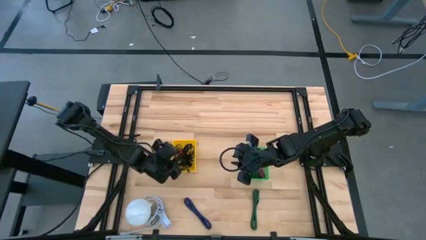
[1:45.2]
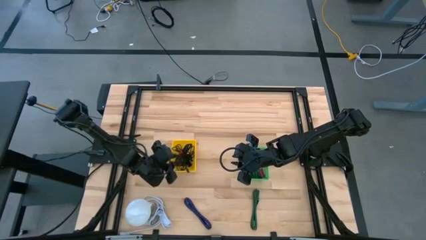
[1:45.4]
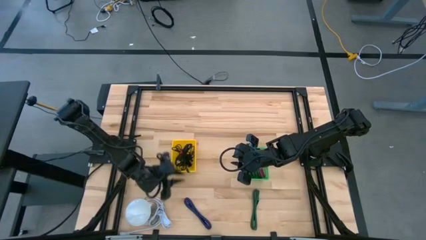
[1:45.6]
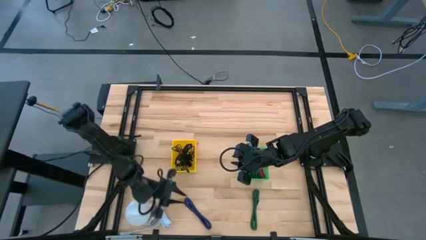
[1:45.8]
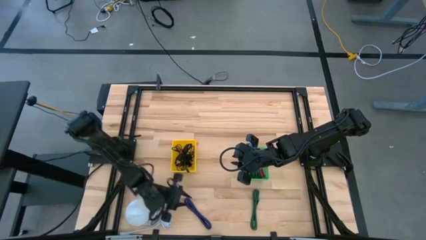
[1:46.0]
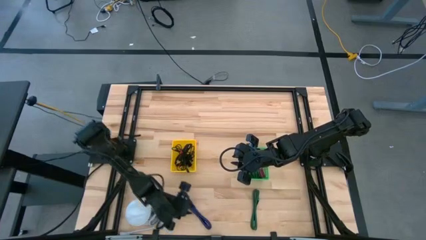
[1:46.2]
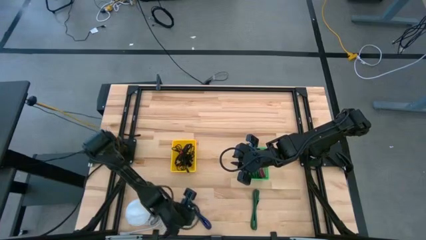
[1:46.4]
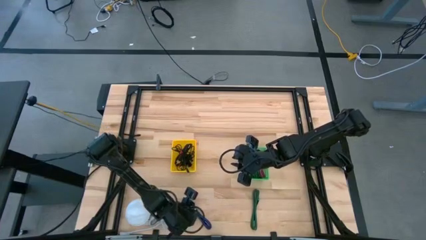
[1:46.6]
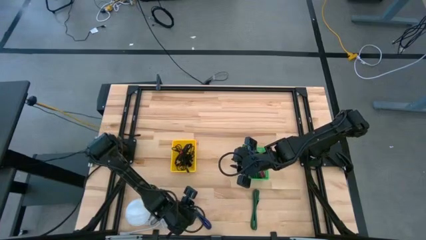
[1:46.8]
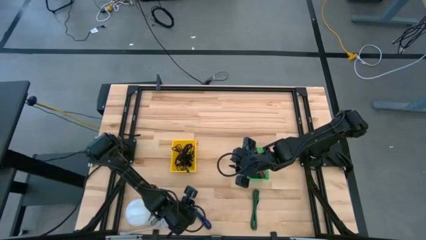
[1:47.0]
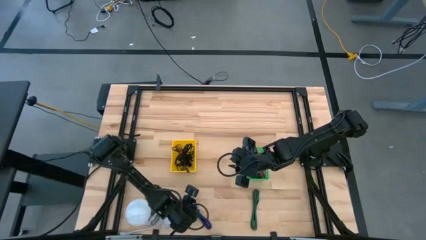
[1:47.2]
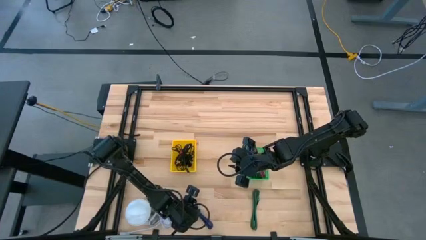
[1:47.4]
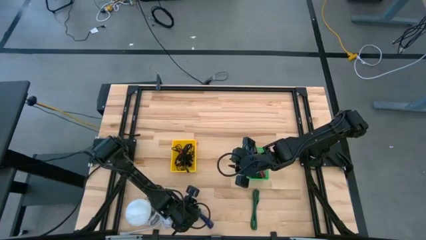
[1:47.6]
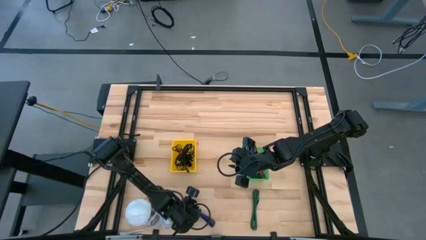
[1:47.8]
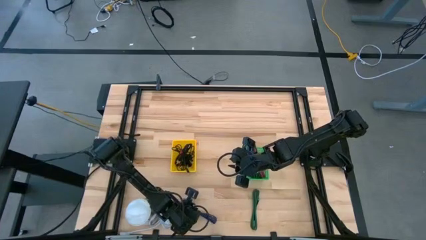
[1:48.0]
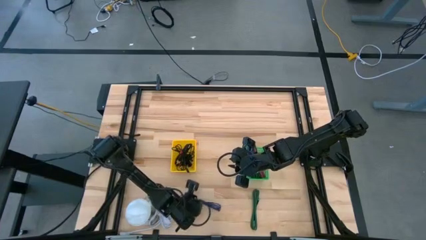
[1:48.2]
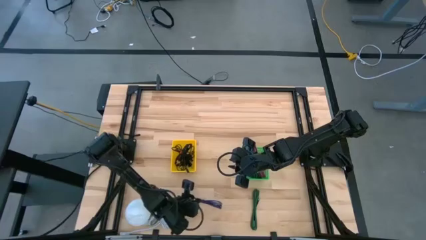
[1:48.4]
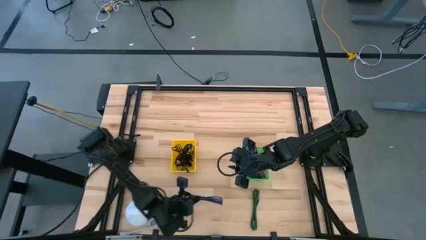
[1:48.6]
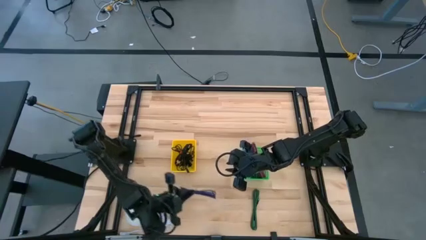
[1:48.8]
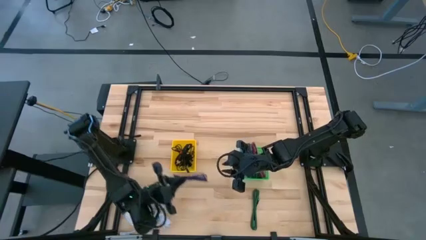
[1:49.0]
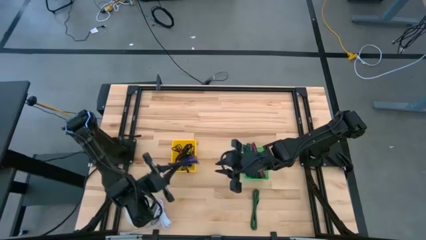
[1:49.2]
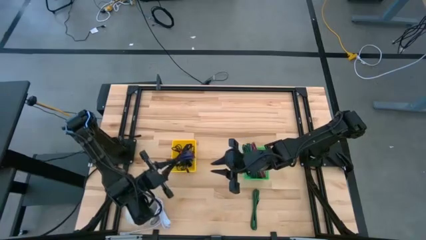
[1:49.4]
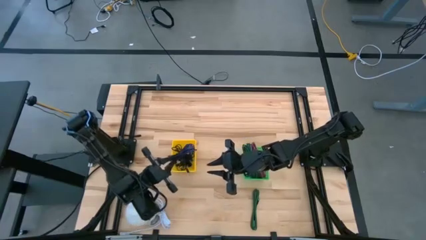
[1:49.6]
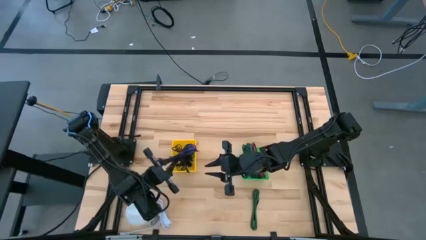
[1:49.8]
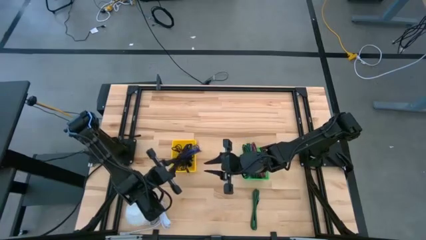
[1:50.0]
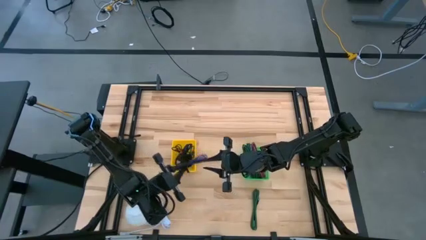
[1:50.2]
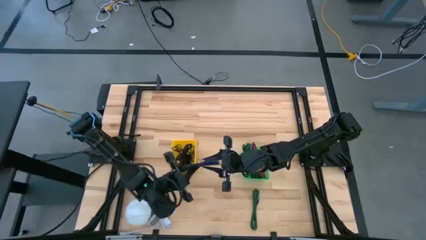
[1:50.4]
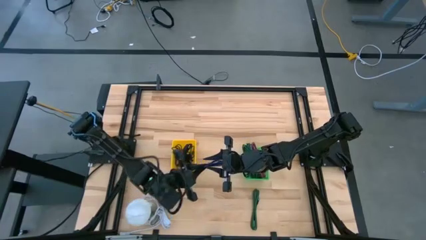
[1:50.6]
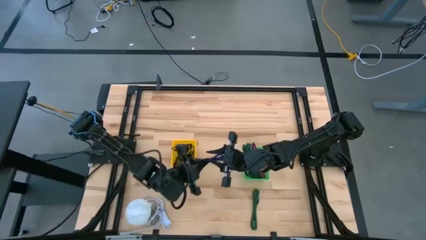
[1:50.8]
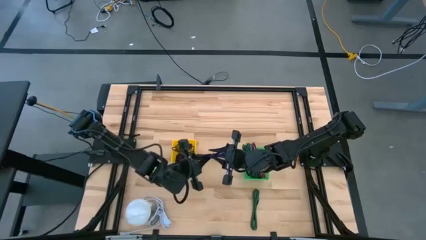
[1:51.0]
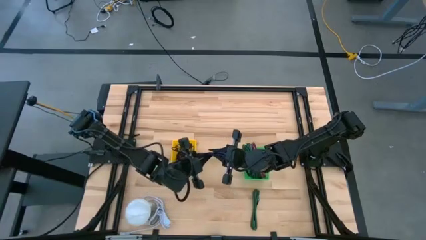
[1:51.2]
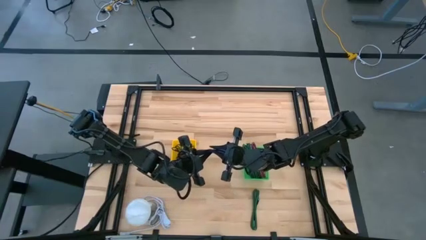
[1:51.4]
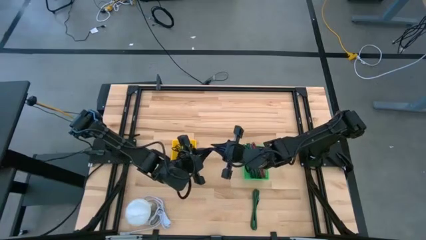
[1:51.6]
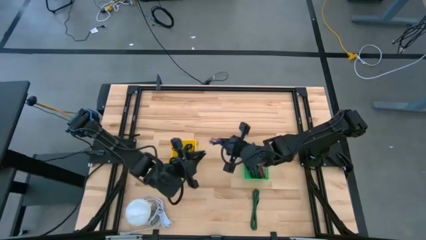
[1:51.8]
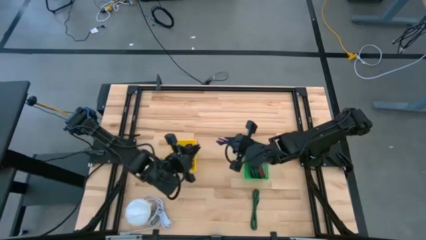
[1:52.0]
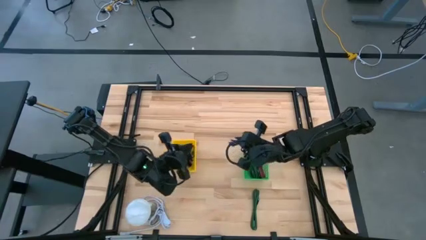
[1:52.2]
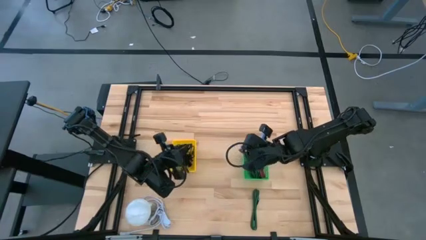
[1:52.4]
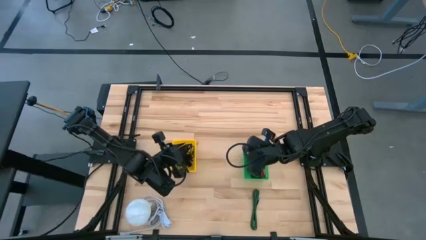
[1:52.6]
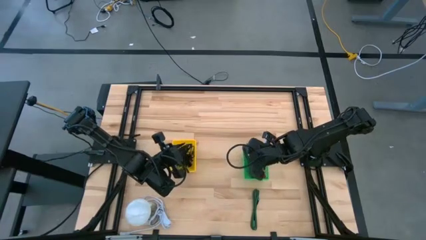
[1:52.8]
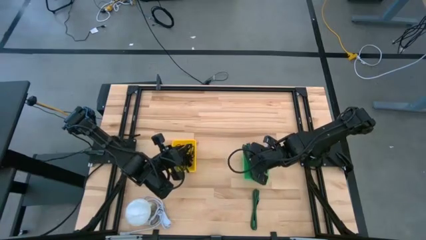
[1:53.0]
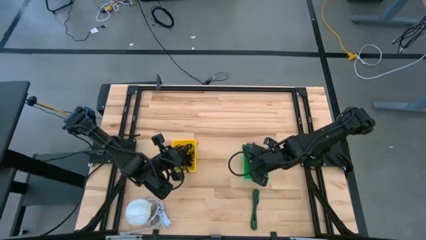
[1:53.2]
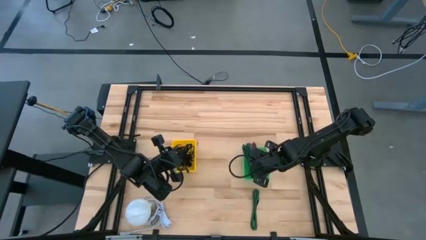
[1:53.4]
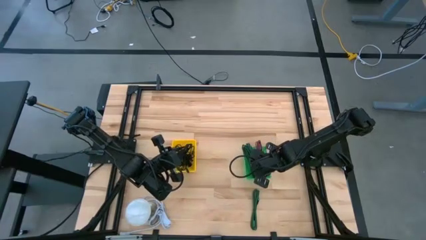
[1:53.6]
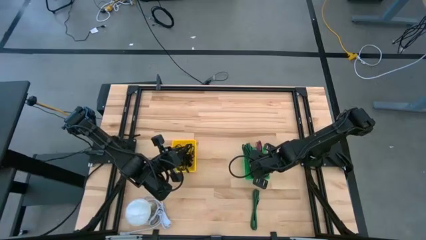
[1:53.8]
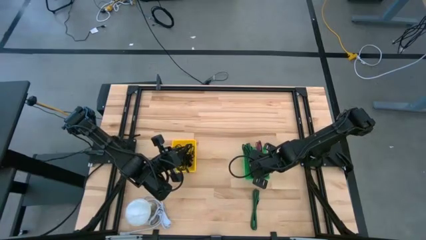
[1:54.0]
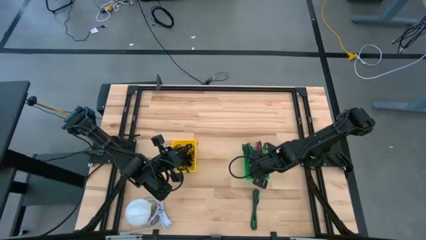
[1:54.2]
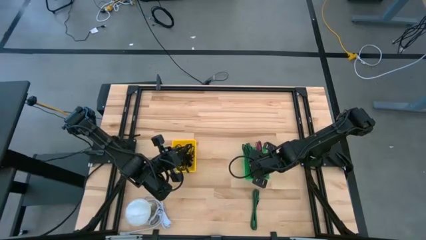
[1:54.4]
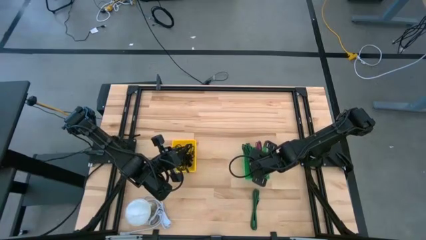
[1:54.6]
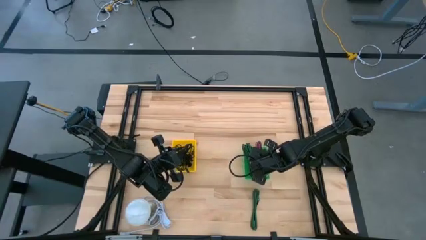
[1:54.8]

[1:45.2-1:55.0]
Task: Pick & Place USB Port
Put the black blue charger cable into the green bin

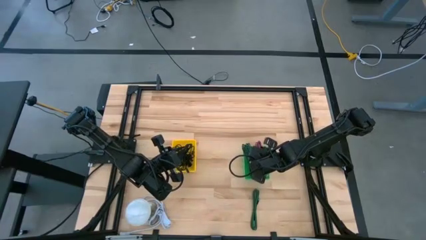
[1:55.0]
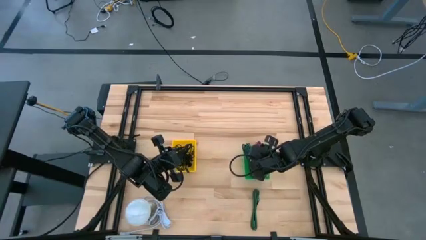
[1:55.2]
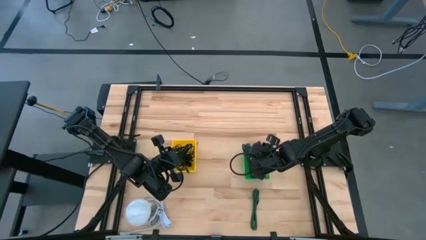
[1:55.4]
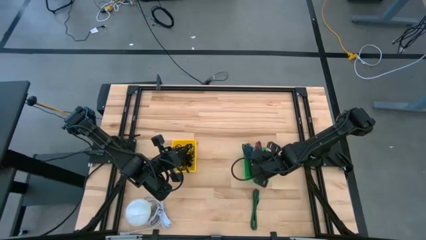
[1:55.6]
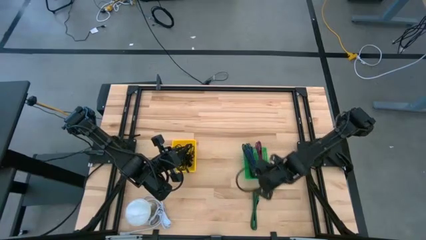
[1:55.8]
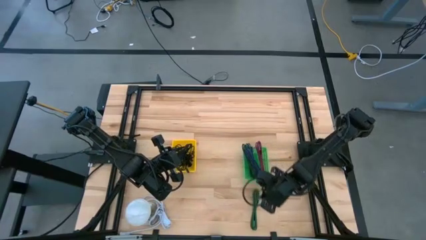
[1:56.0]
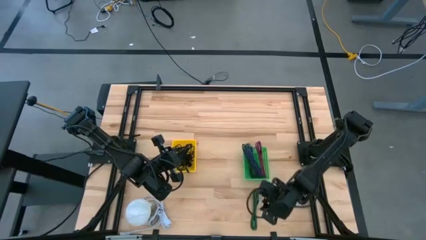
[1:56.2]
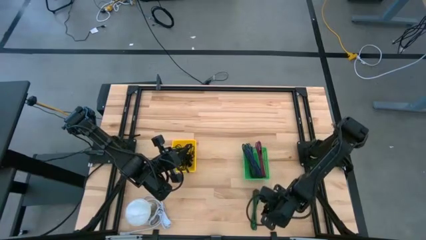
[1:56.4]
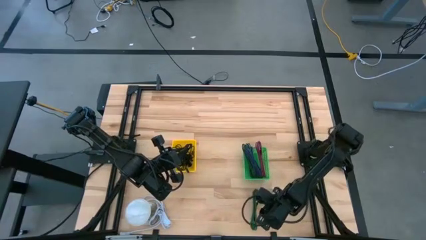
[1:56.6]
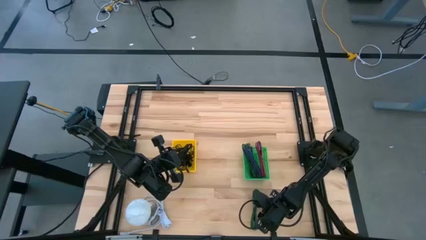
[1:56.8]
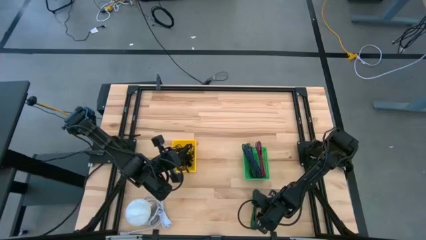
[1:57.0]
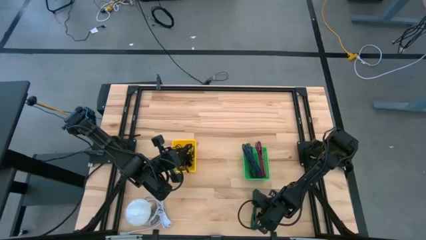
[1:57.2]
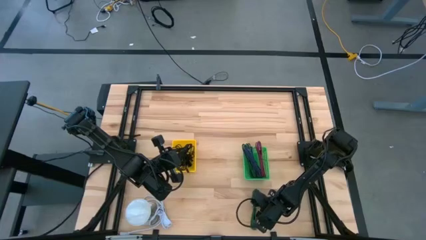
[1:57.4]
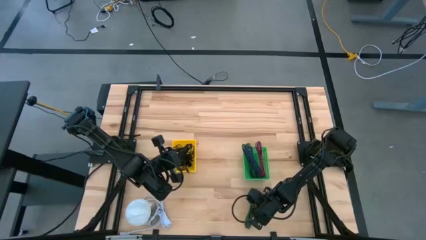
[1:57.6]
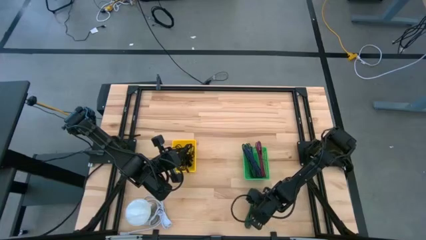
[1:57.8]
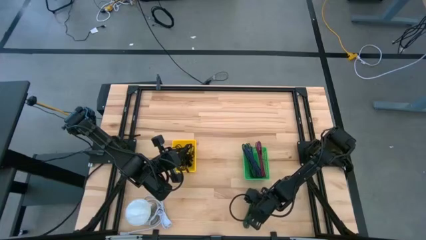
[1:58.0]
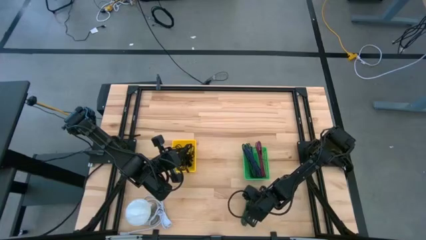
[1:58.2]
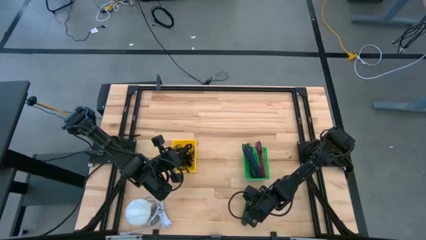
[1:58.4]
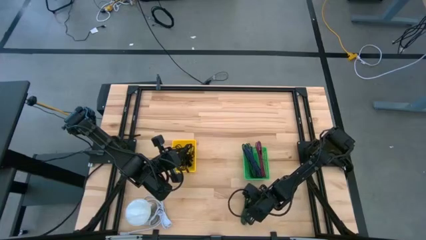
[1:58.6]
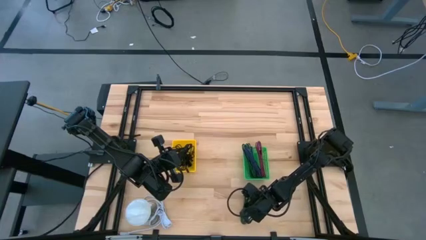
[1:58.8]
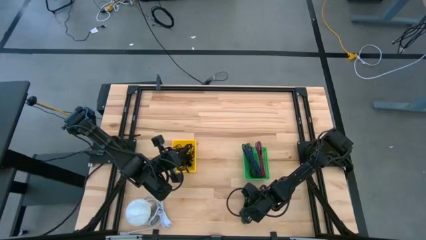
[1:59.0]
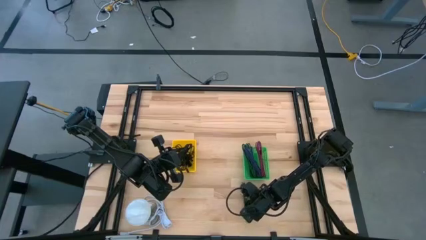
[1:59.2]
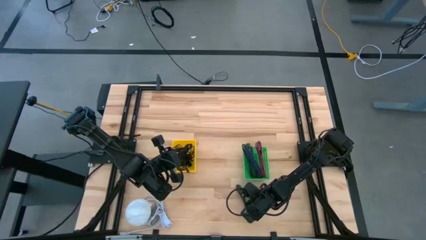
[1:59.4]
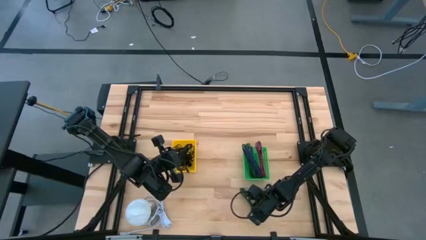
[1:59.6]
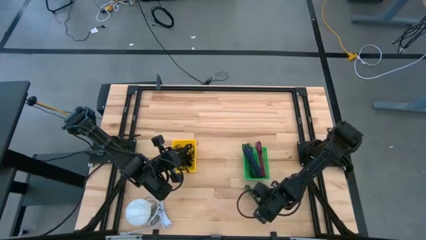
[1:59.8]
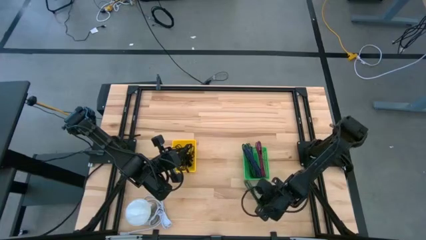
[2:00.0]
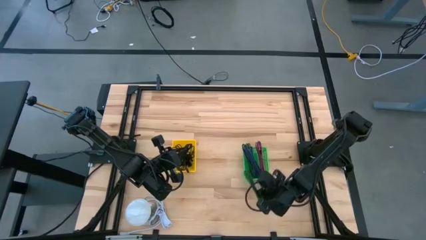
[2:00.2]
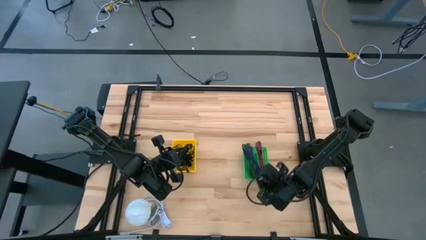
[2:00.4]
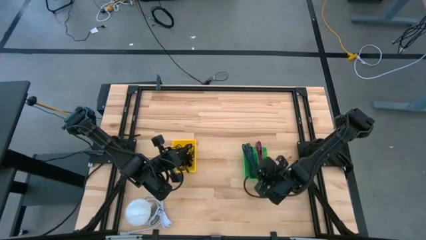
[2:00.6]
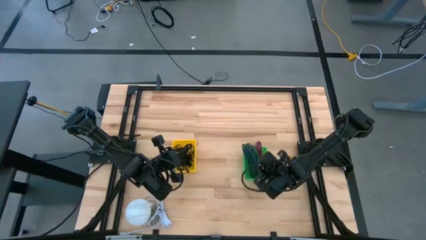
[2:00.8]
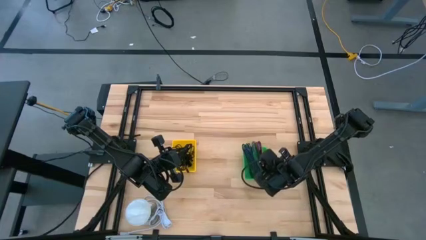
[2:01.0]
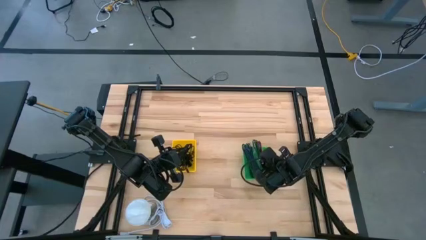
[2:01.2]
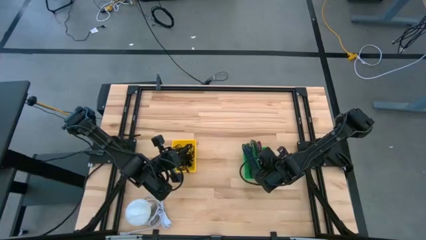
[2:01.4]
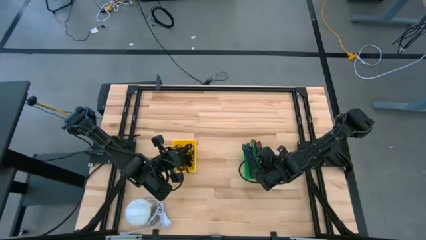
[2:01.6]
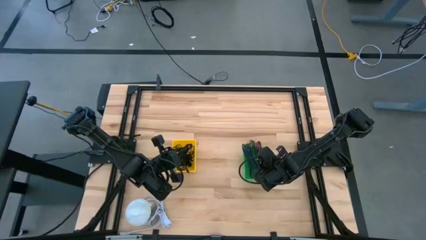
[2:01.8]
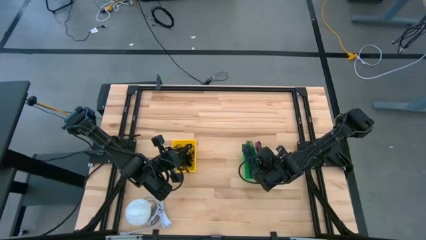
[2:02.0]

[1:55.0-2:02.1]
Put the black green charger cable into the green bin
